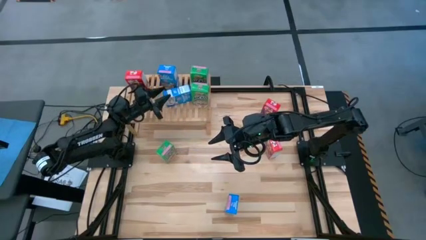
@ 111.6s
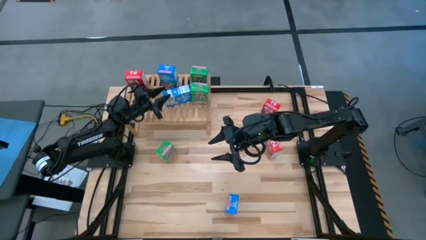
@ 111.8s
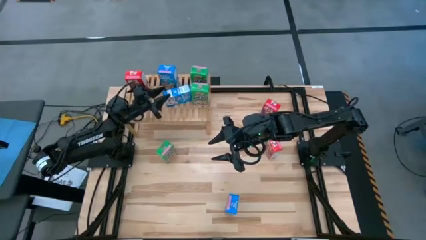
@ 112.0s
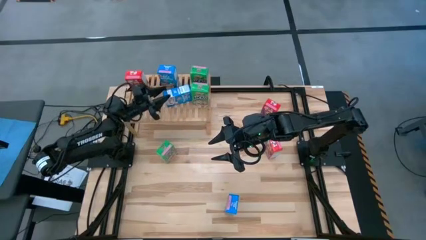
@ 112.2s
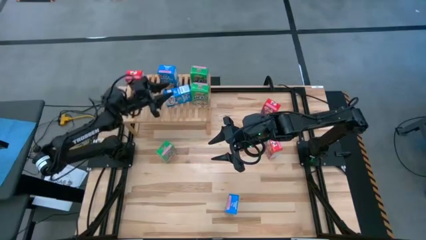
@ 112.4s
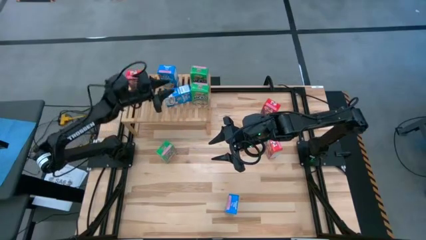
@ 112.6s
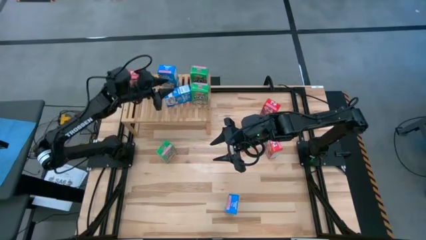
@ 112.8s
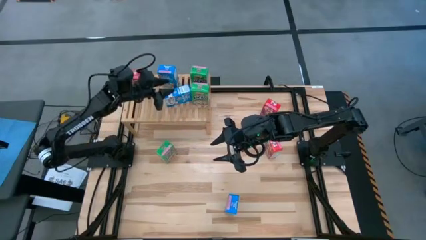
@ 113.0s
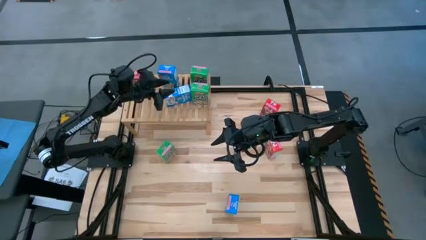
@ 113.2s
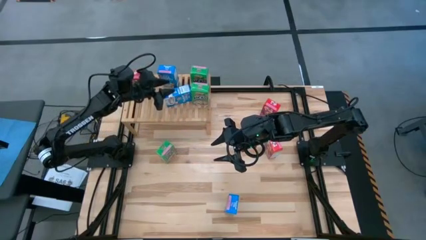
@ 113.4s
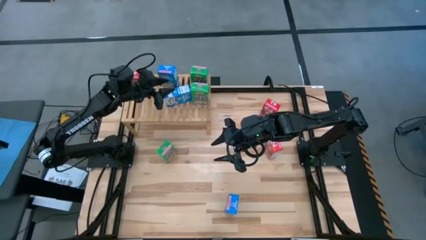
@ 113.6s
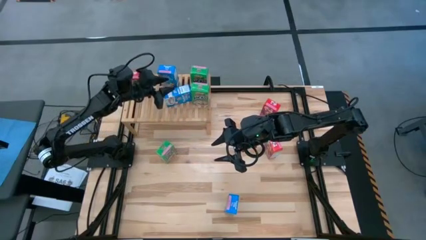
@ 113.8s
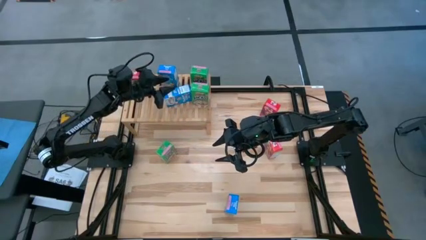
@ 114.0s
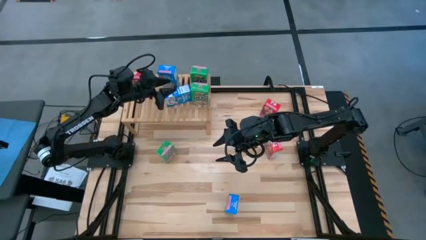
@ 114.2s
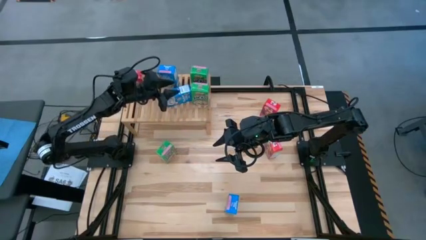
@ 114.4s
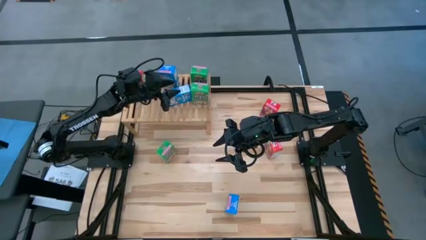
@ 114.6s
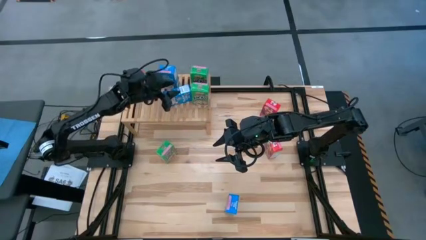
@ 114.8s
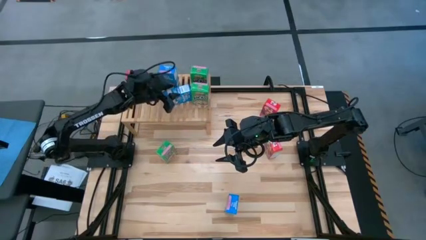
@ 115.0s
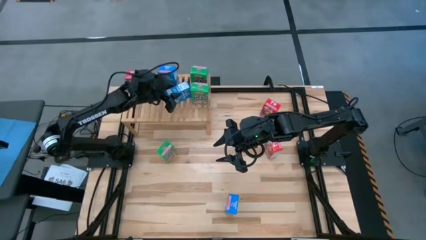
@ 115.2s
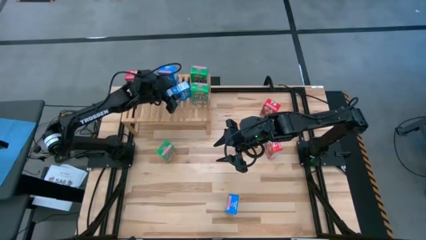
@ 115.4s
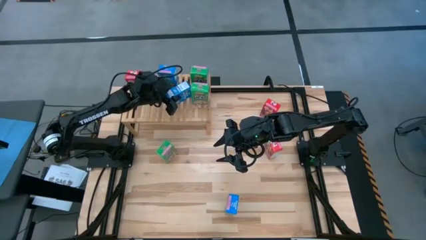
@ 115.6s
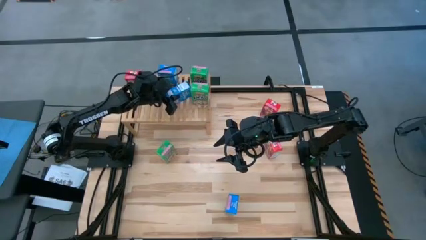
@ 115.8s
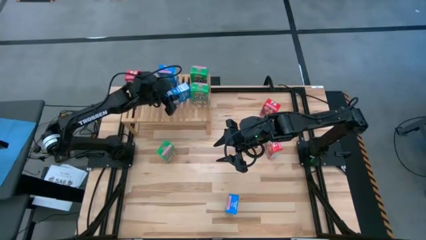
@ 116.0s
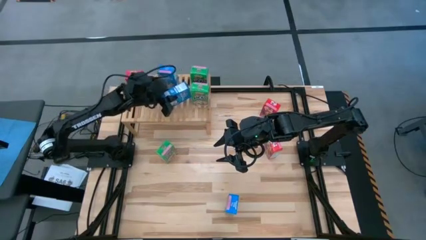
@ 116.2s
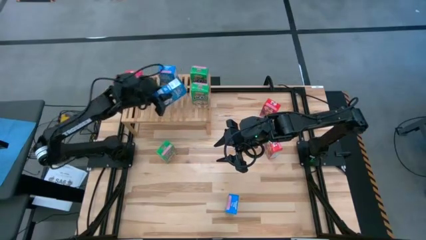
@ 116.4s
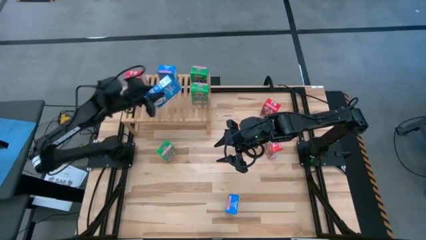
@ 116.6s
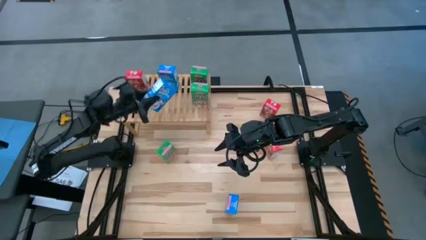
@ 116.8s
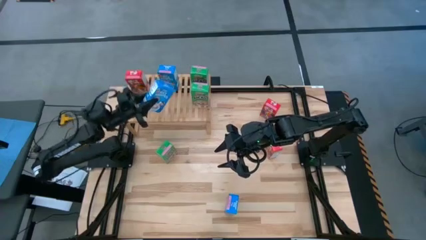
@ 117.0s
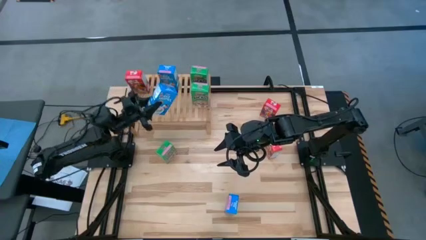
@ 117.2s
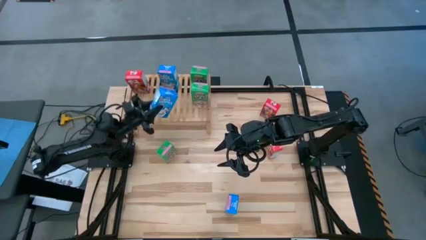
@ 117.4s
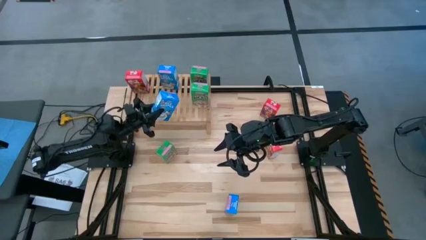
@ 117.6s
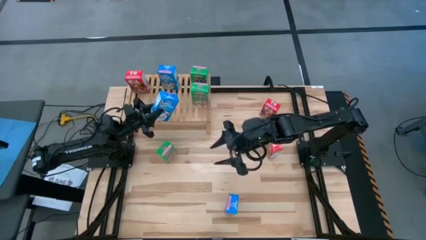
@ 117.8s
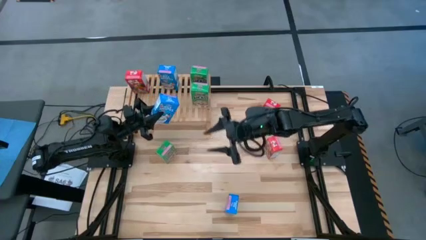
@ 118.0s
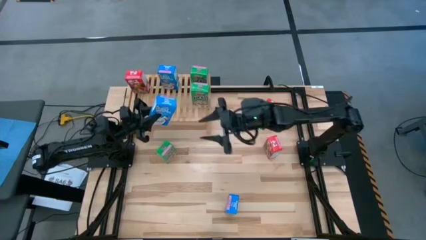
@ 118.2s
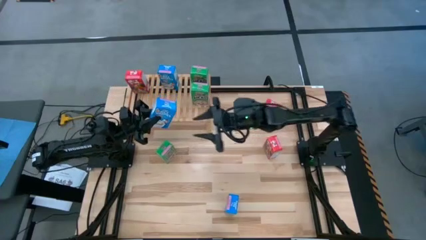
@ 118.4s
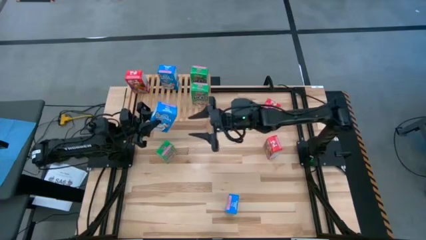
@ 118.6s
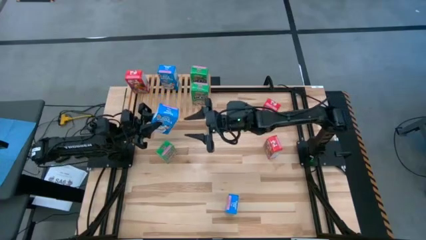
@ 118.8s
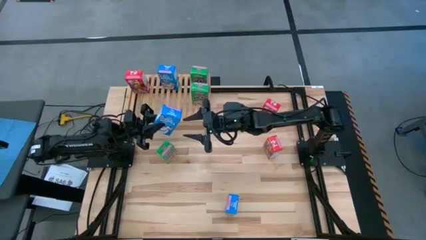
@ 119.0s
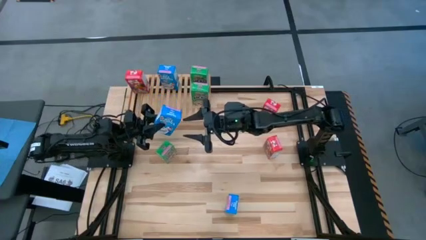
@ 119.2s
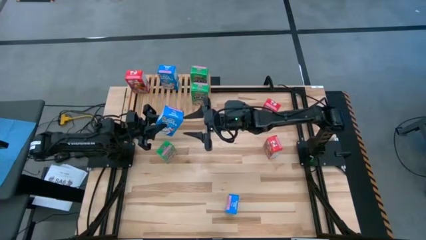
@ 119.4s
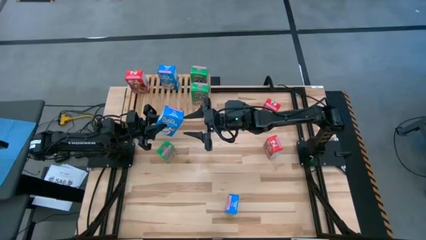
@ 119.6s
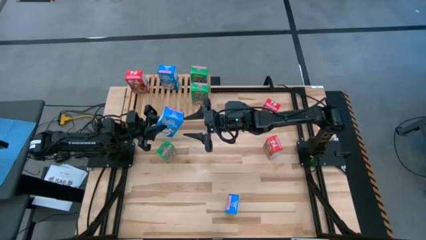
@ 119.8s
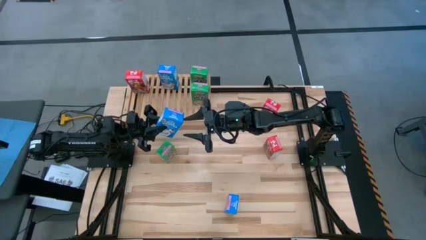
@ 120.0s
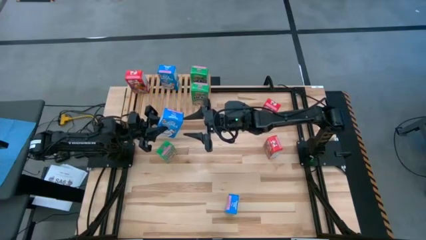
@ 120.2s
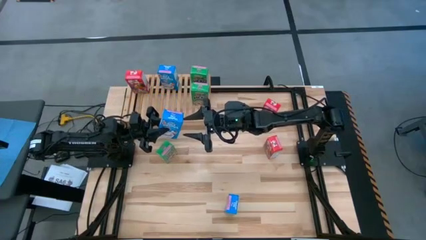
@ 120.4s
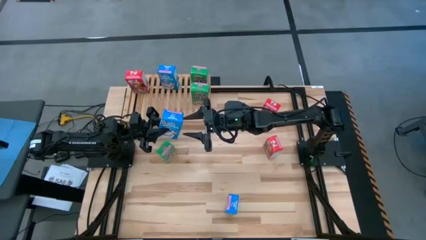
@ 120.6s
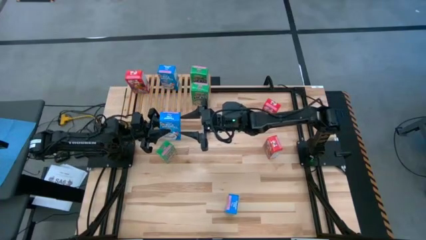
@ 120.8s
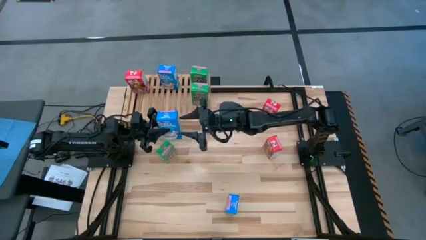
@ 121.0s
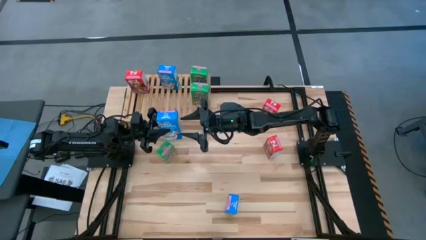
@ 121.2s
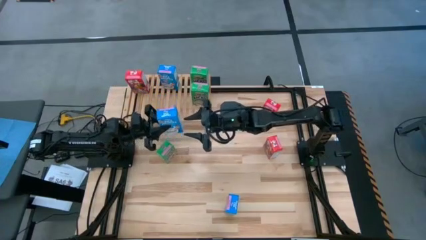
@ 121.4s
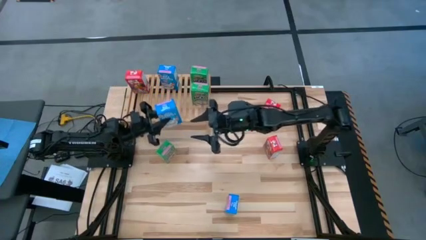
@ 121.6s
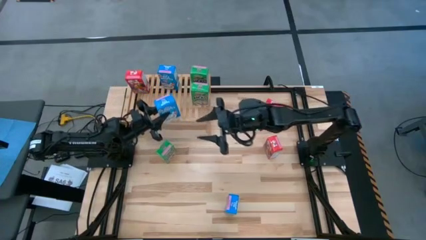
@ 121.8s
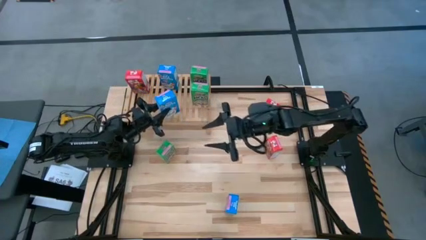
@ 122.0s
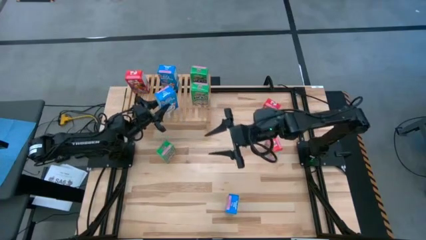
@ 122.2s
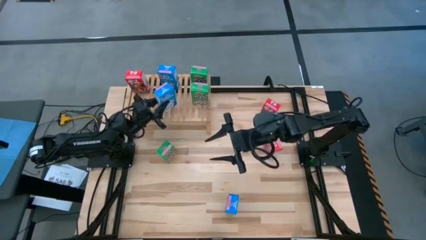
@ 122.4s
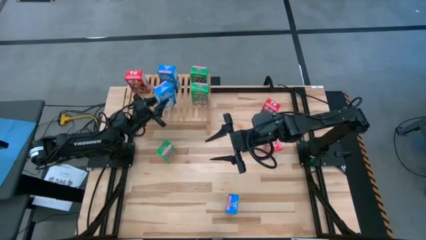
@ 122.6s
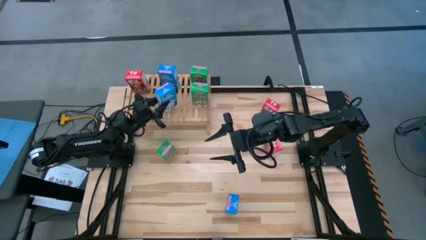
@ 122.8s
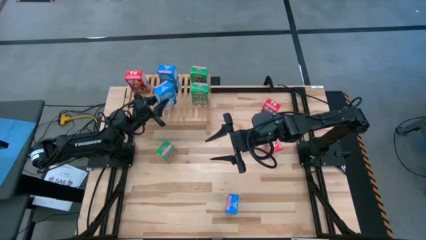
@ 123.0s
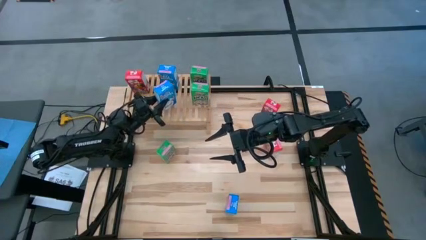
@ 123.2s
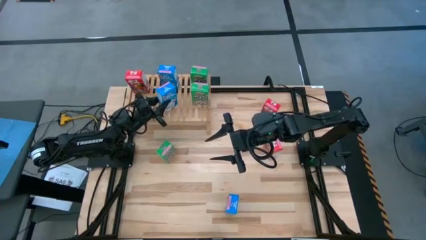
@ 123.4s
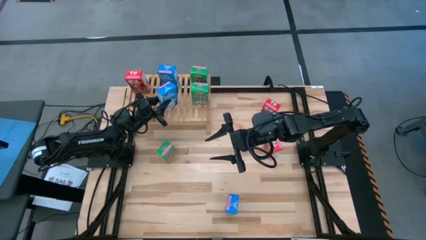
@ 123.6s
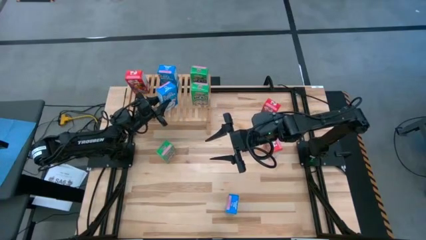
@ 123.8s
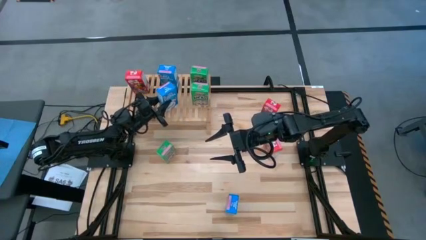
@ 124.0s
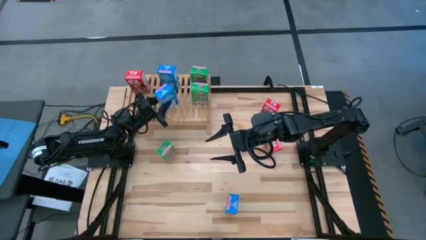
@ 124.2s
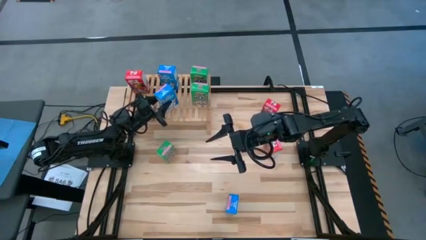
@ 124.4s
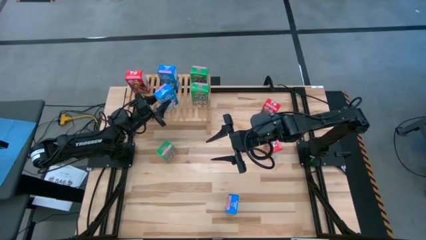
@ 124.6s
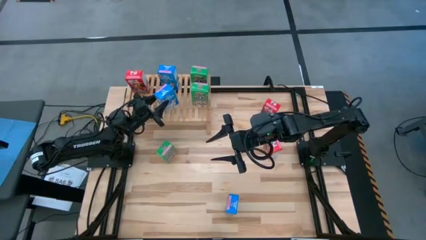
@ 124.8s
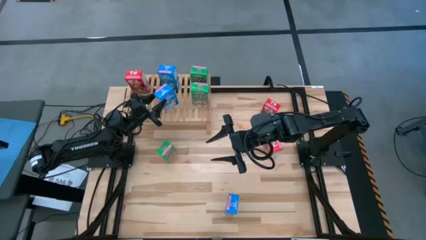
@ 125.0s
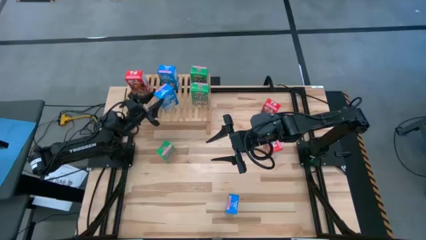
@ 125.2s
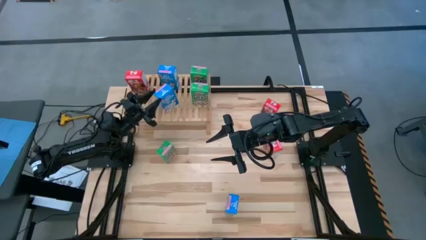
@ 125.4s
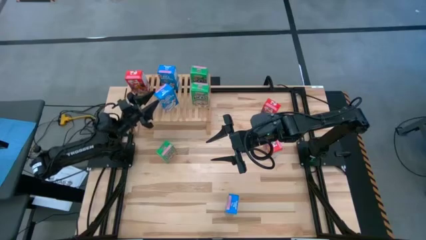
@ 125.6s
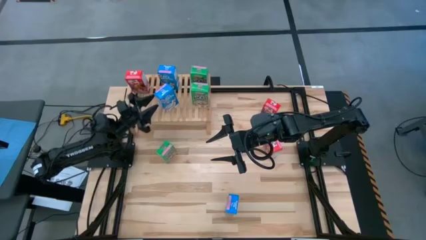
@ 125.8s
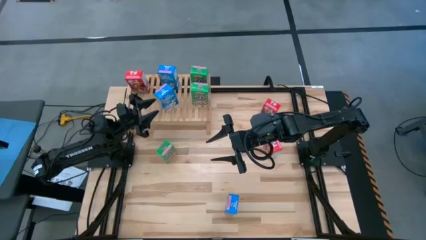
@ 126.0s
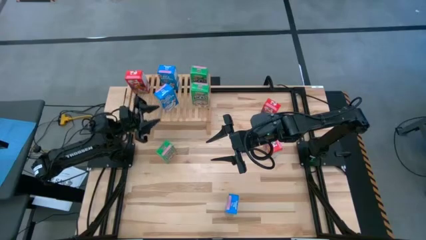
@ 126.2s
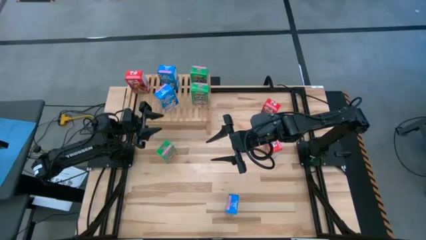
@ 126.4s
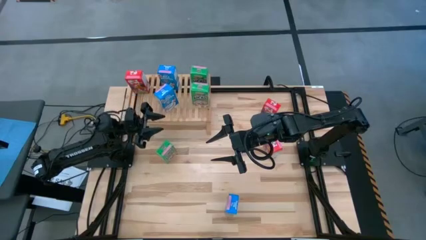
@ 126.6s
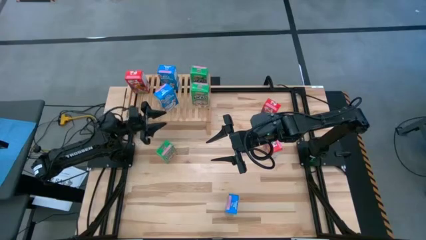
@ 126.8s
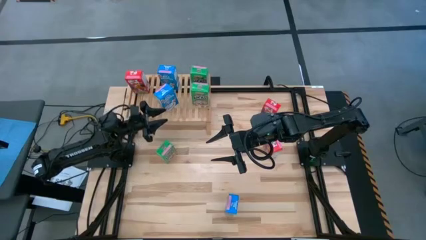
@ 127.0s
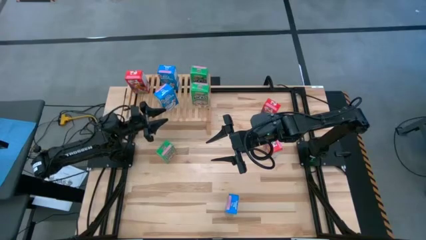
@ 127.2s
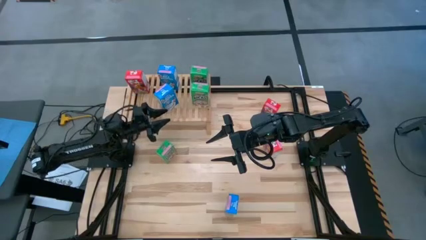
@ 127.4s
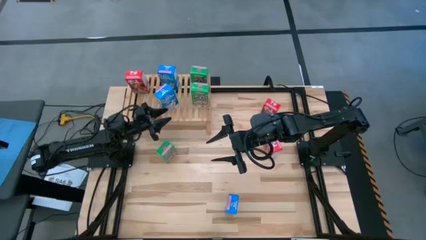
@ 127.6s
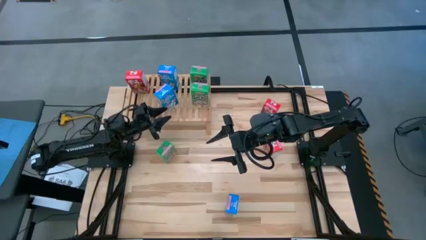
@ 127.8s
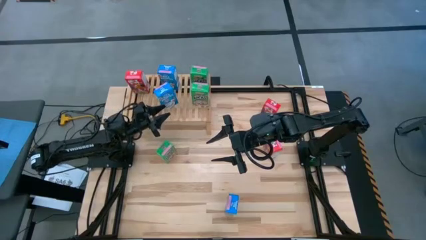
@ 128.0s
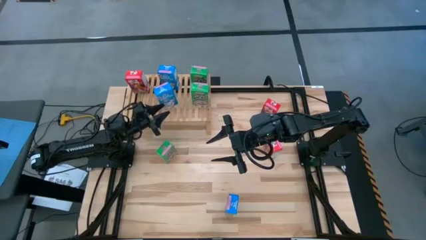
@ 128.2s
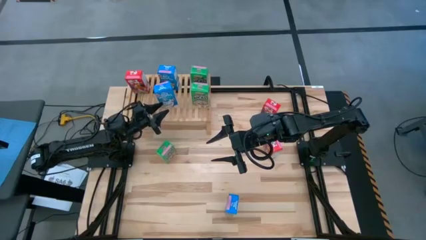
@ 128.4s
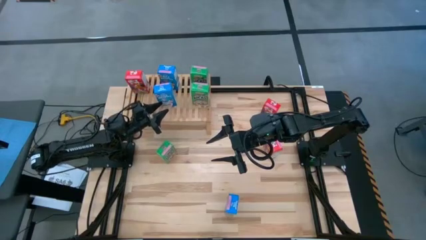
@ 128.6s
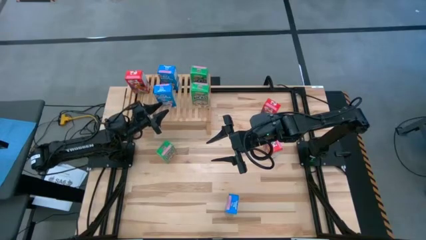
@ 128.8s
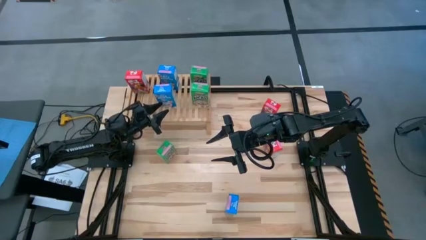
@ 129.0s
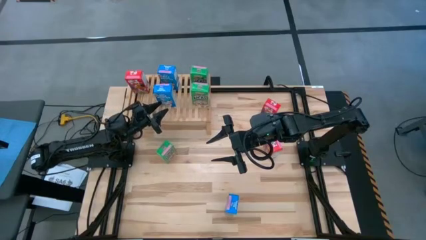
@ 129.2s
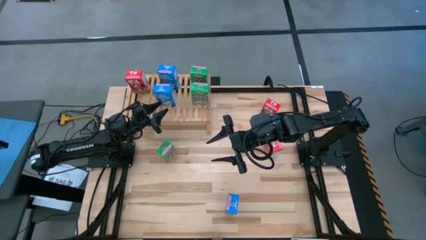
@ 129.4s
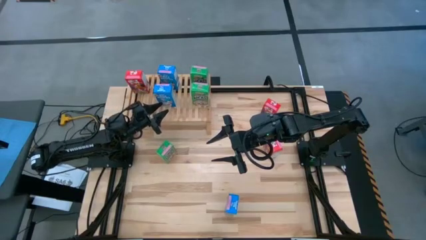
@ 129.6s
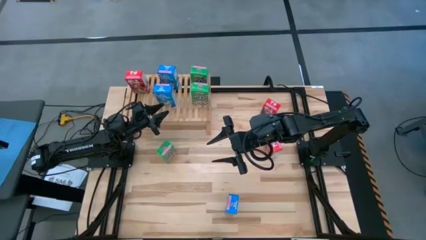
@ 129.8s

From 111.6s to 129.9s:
Task: Stack cereal on shelf
Put the top blue cereal box on the shelf aligned with the blue cereal box
